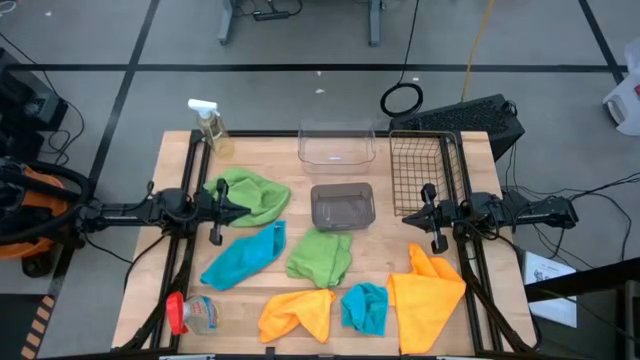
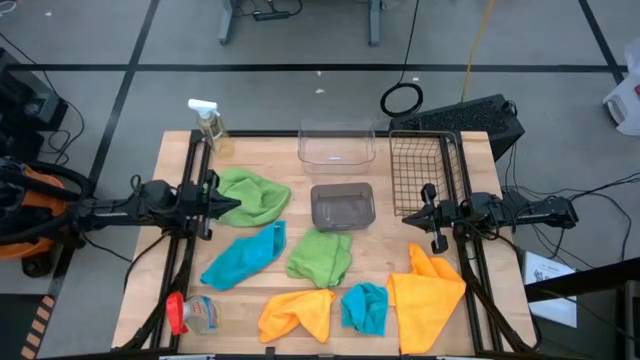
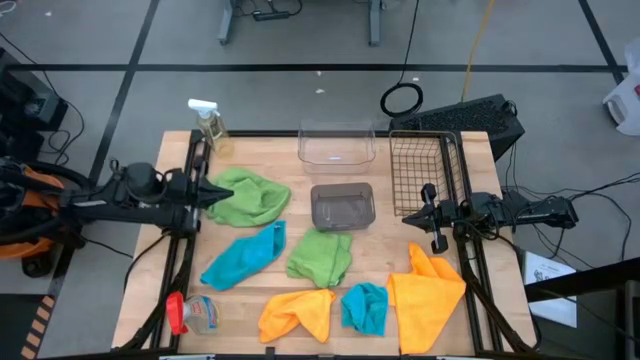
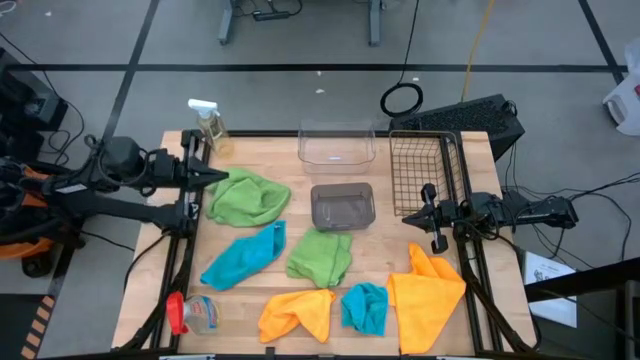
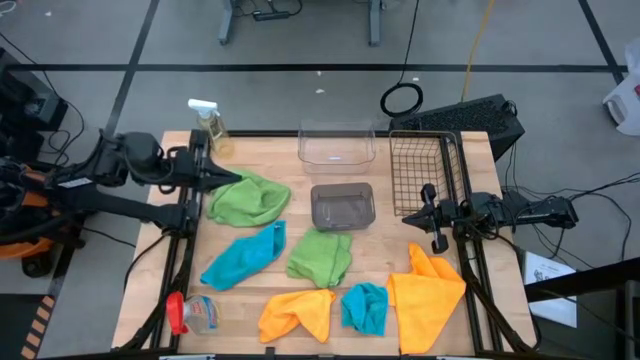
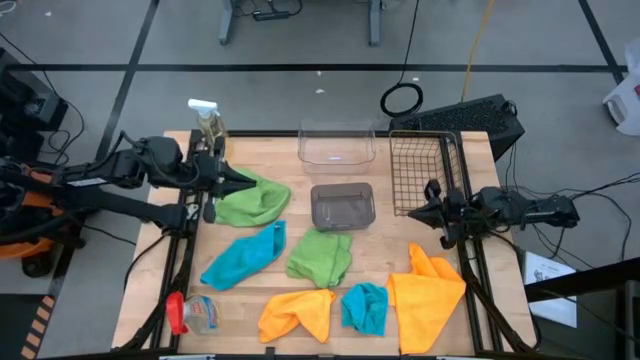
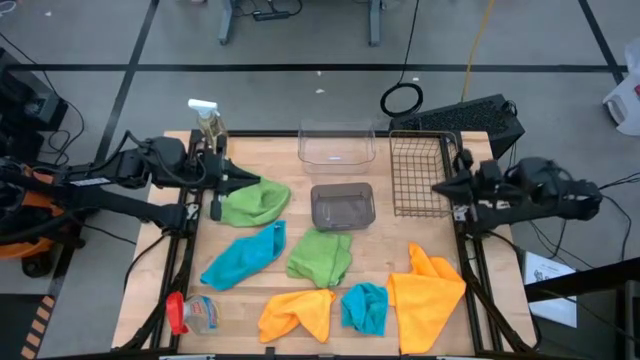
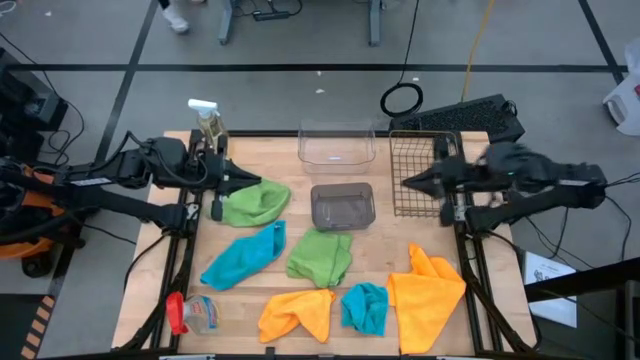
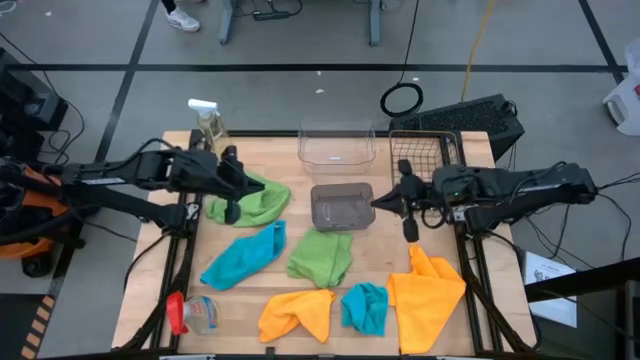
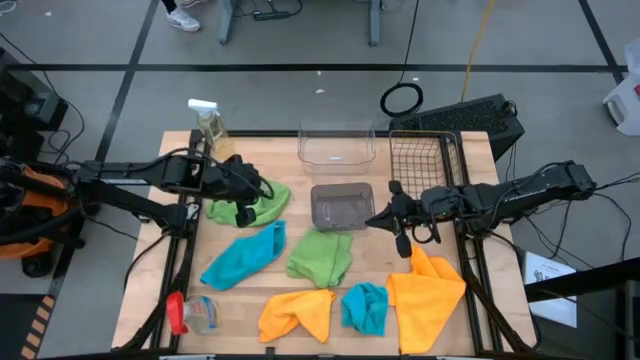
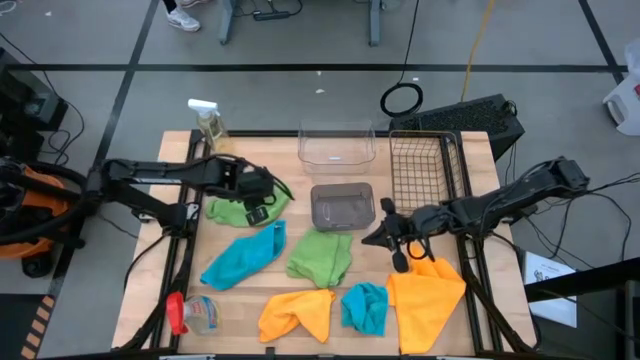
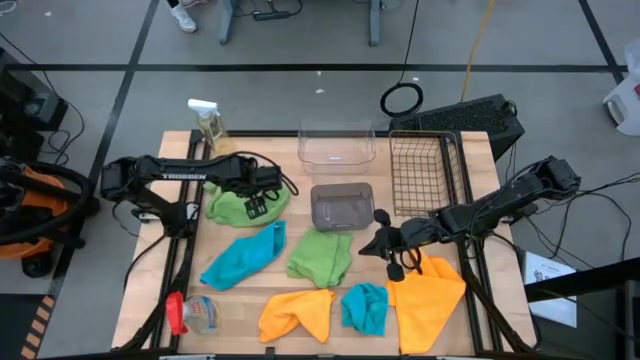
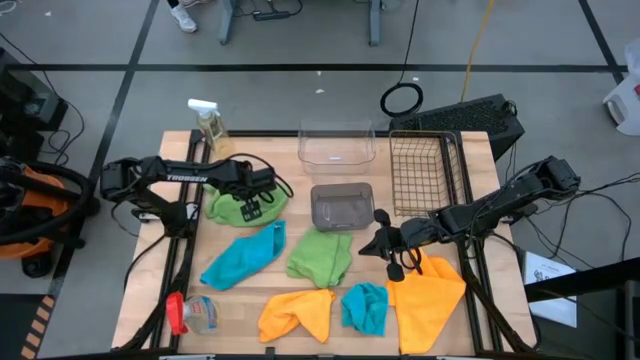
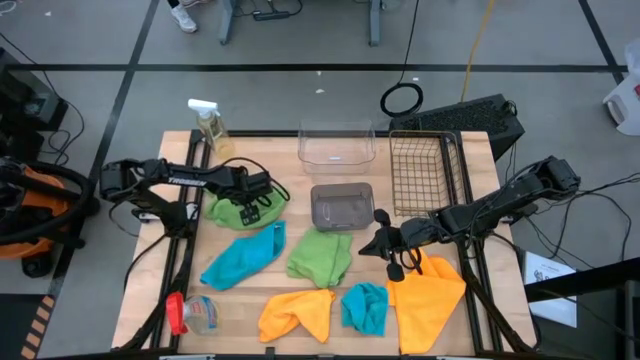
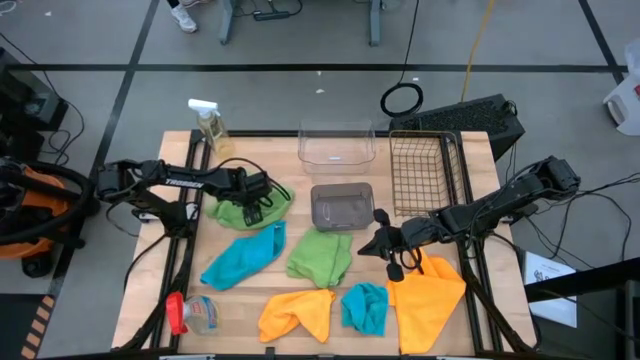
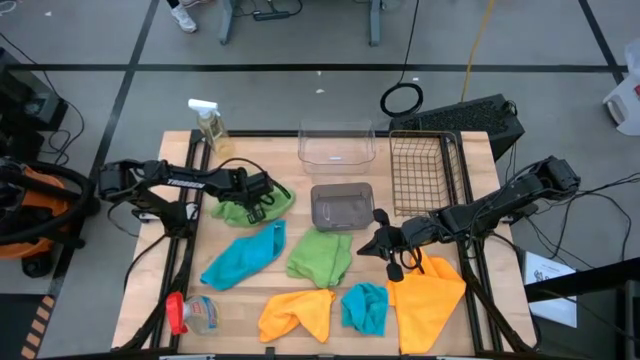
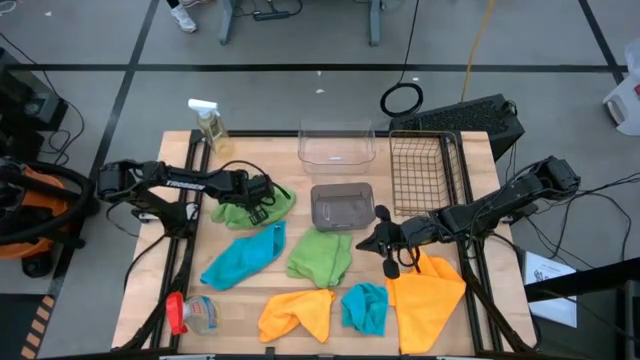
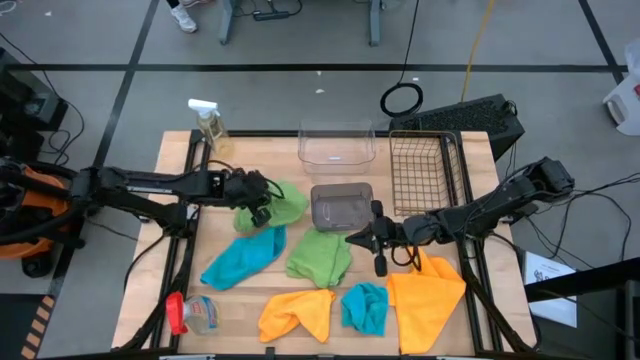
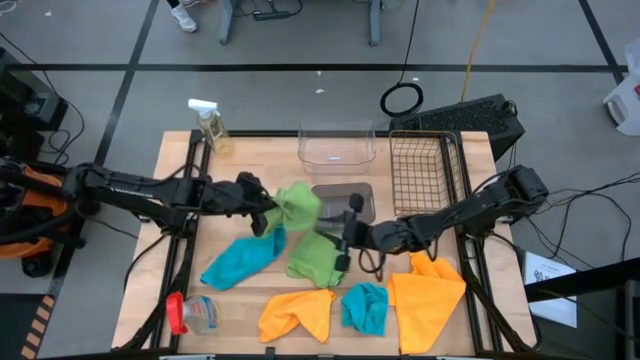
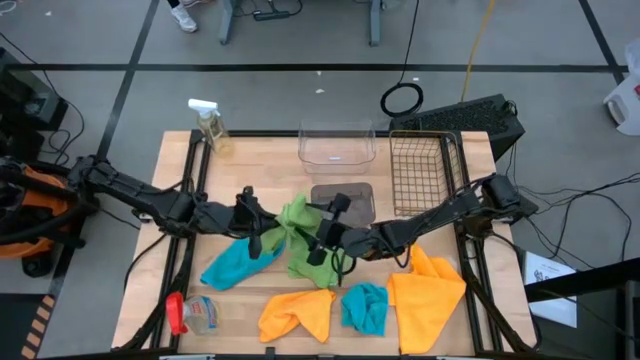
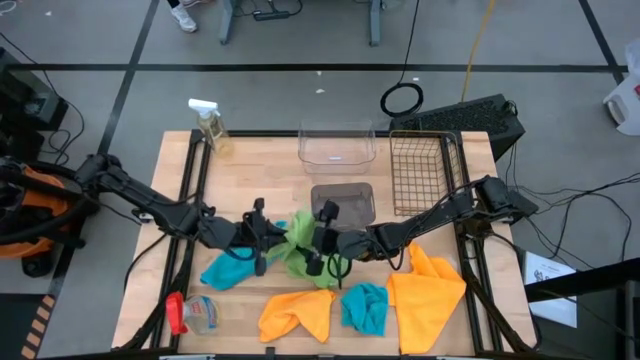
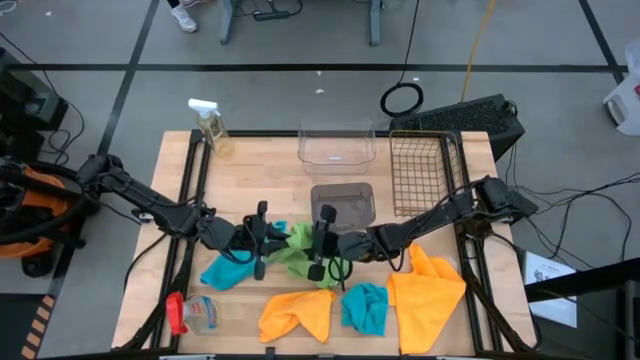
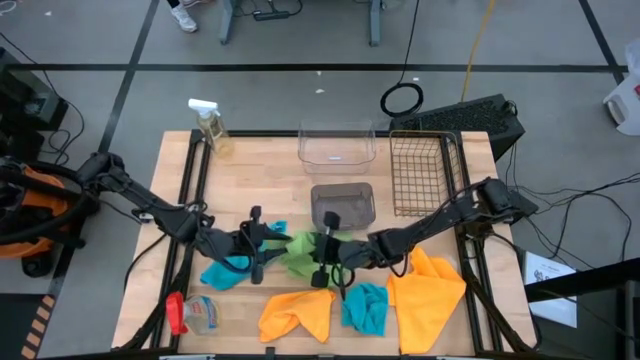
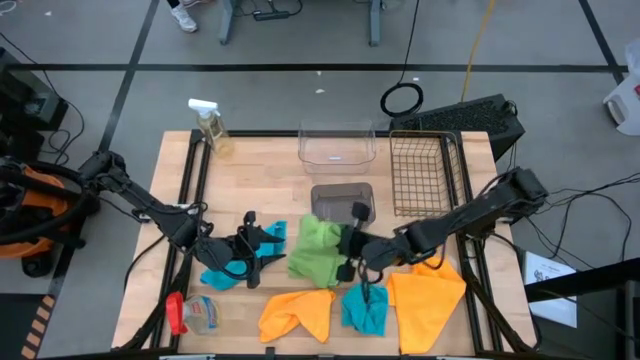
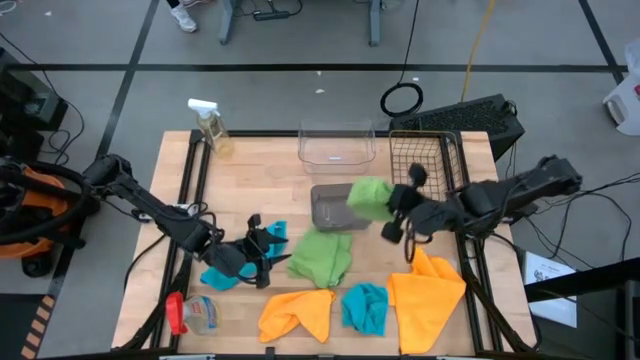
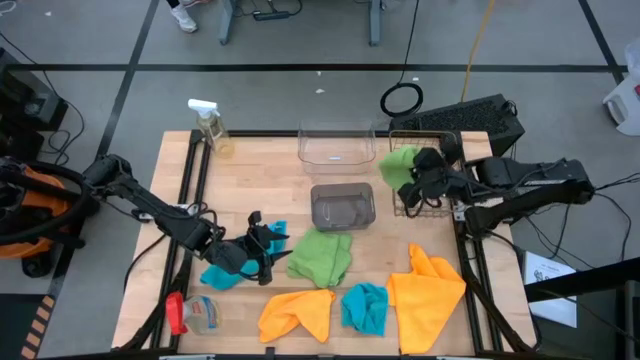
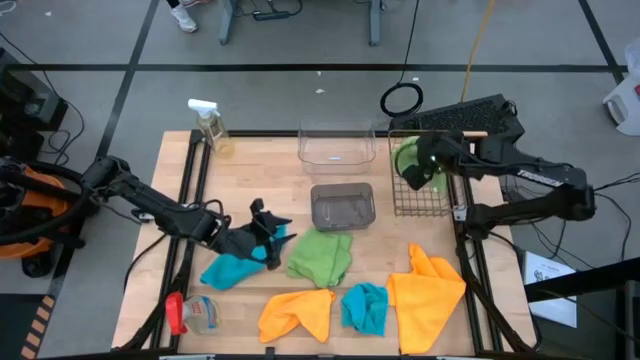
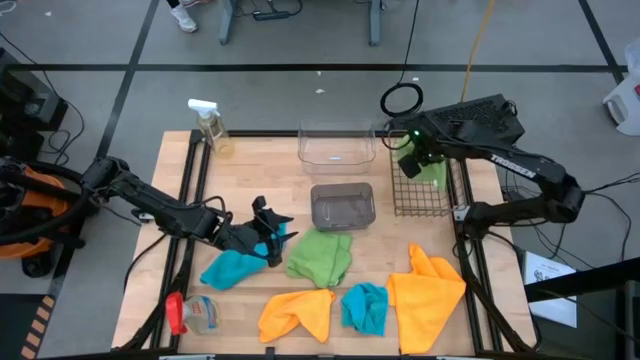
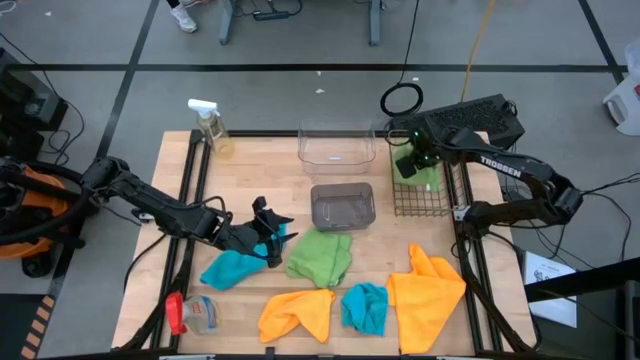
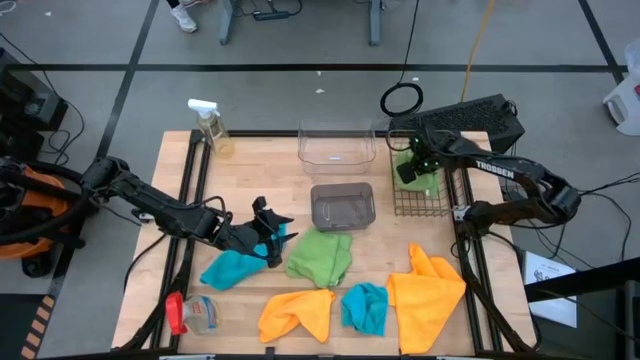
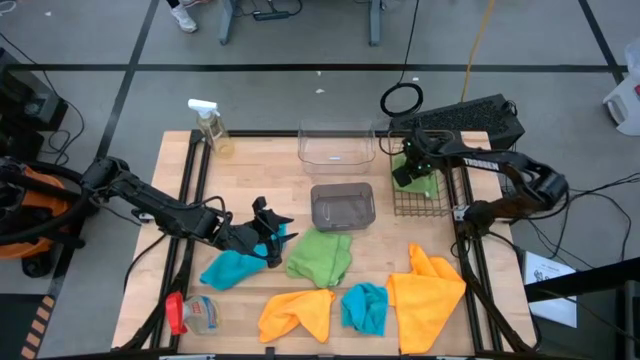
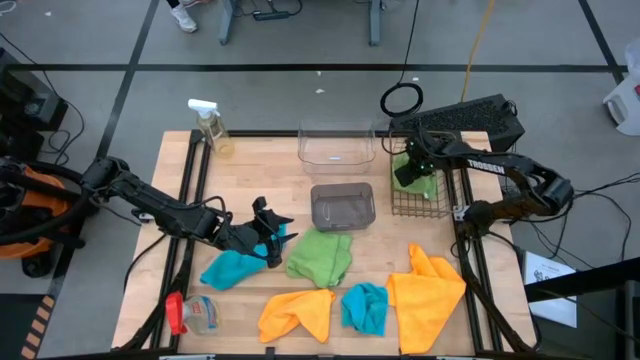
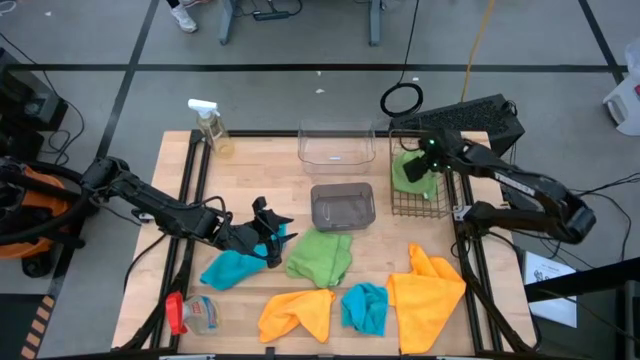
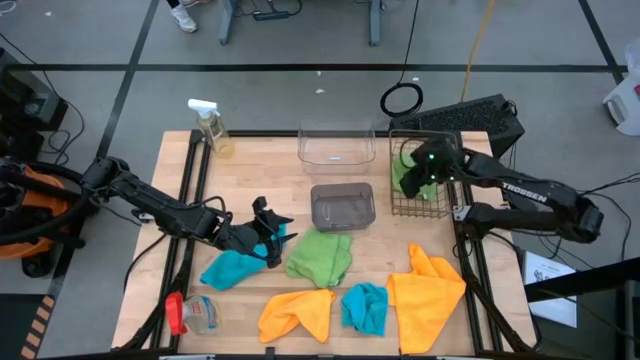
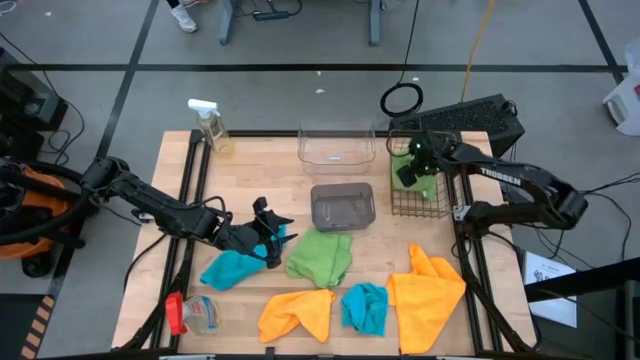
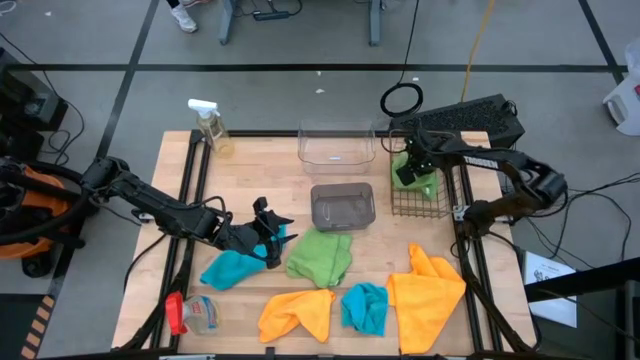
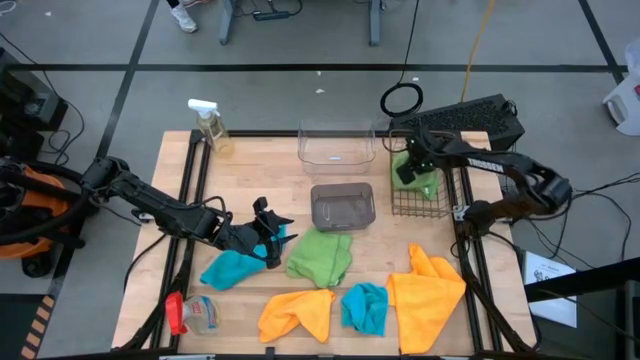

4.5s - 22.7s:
Task: Sort microfiber towel by color & place in baskets
Put the top green microfiber towel into the wire basket

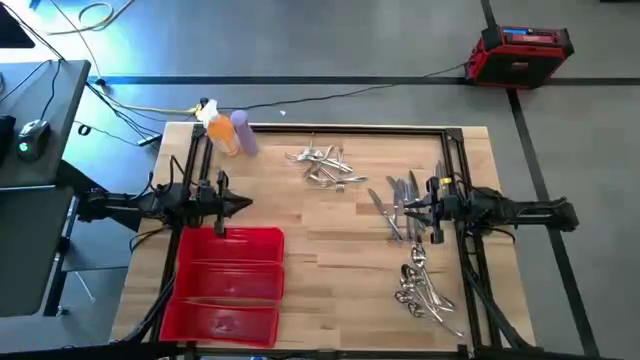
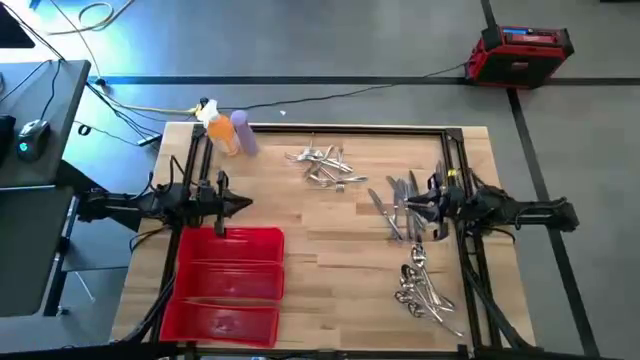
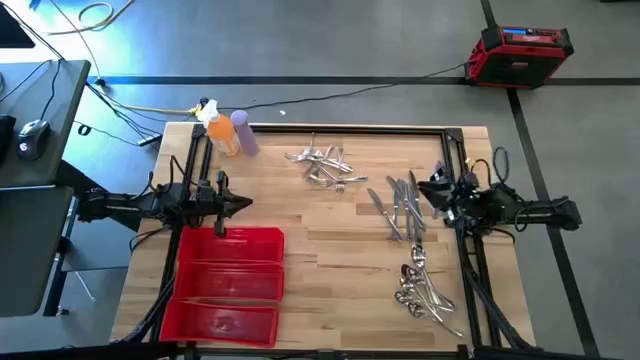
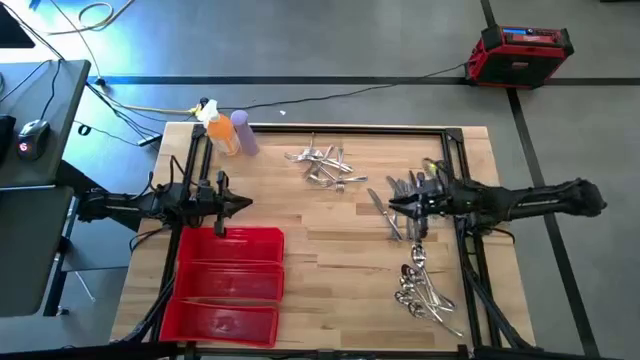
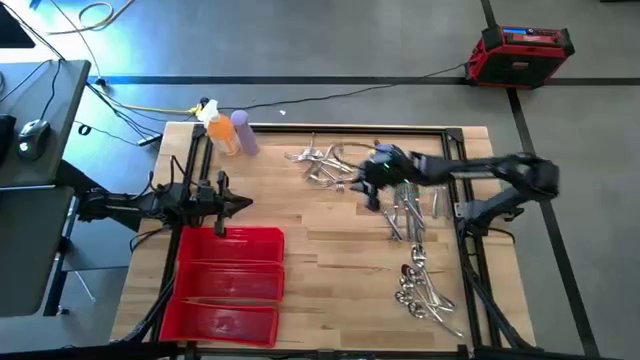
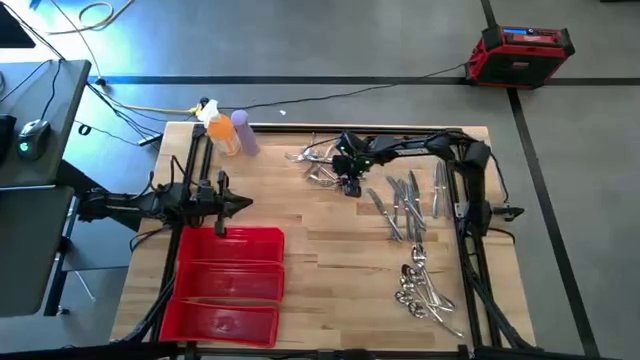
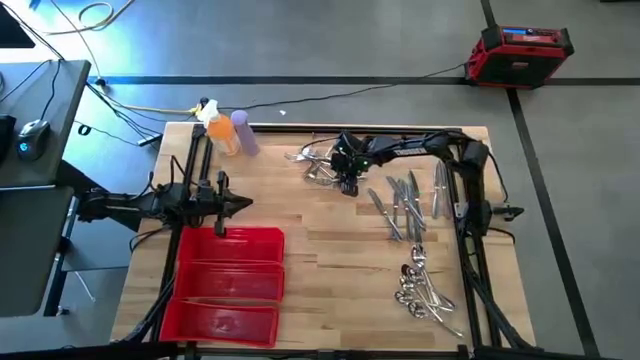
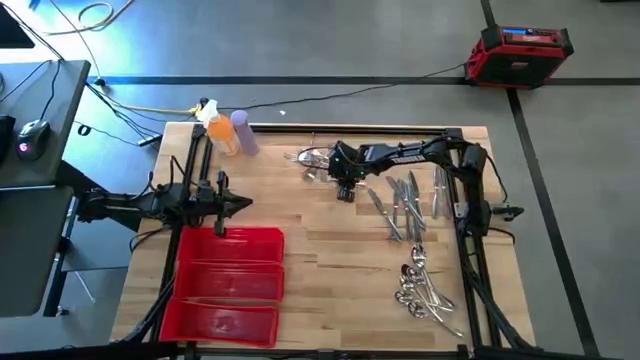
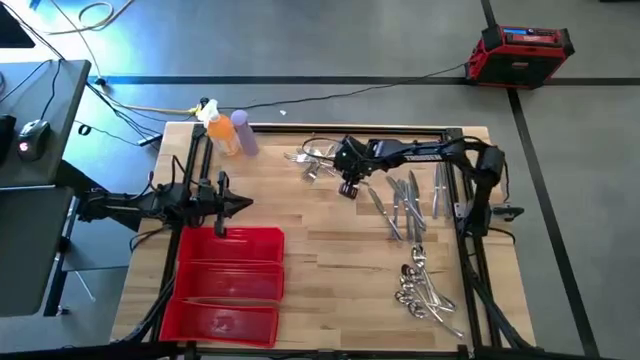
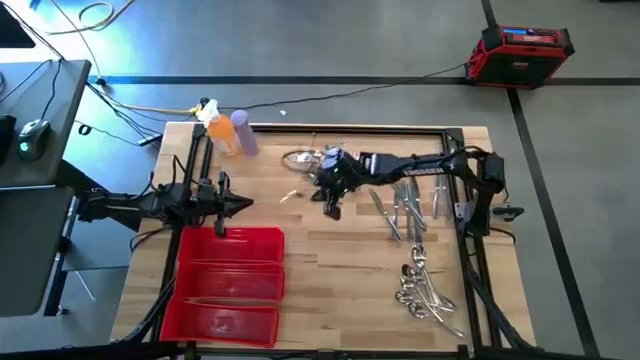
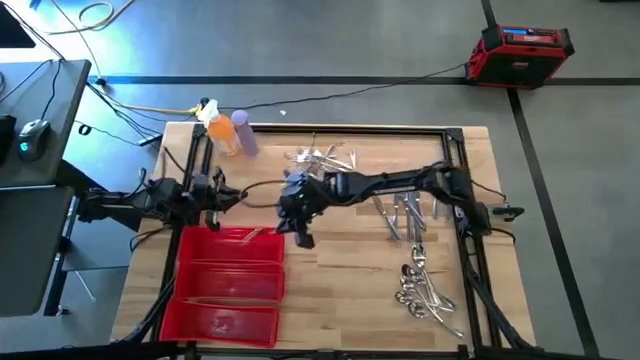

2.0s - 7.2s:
Task: Sort silverware
Put the silver fork in the top red bin
